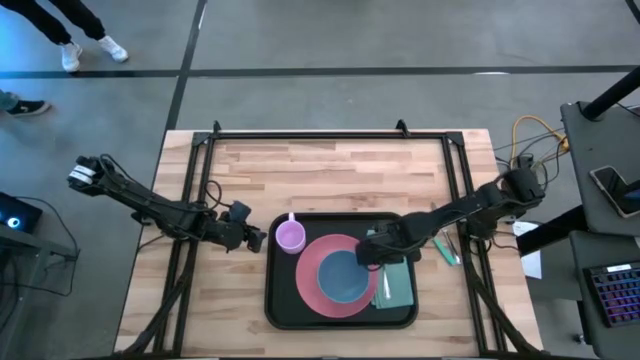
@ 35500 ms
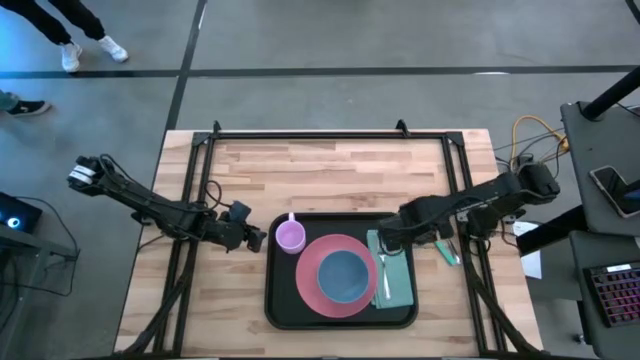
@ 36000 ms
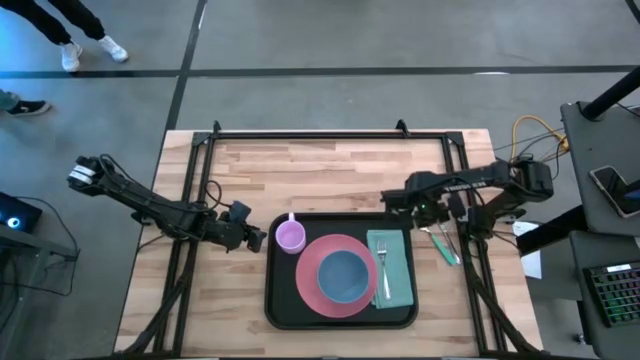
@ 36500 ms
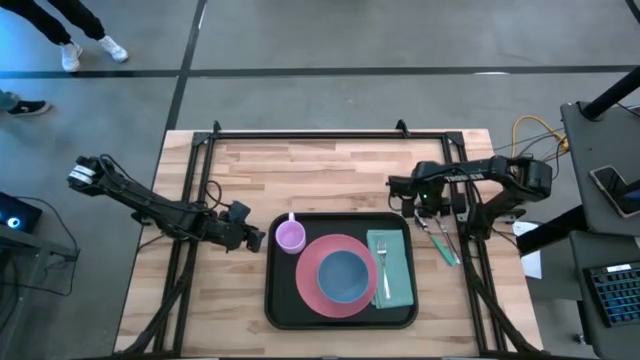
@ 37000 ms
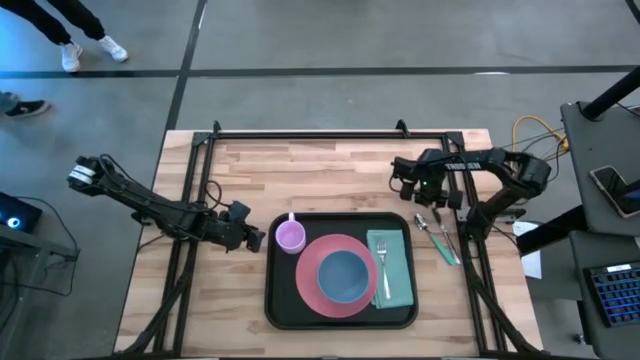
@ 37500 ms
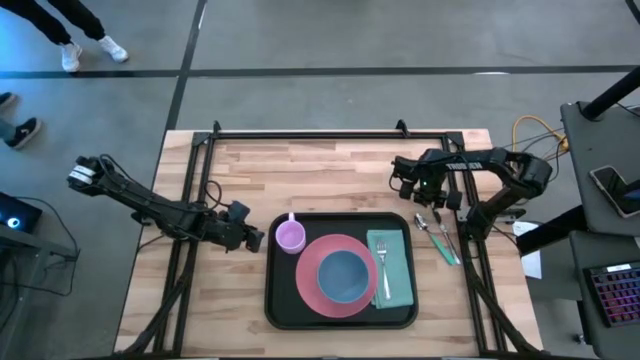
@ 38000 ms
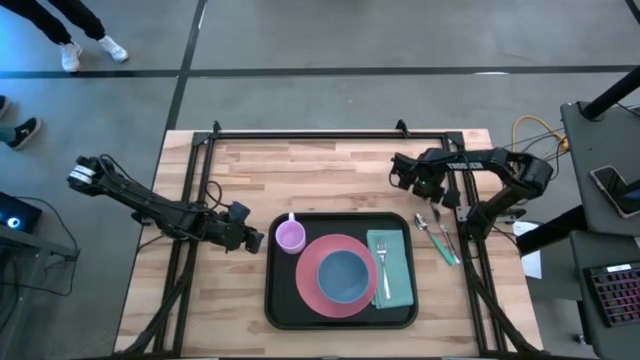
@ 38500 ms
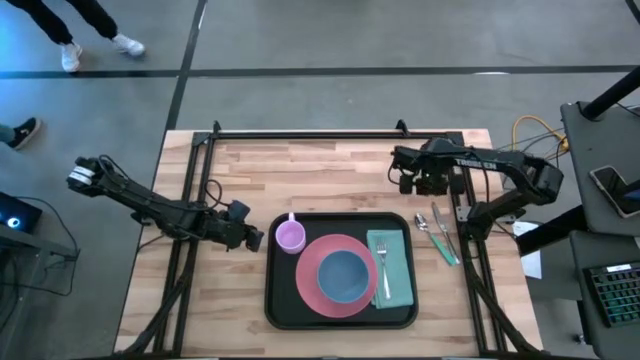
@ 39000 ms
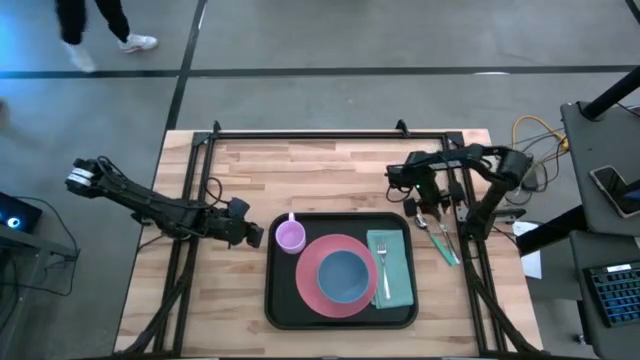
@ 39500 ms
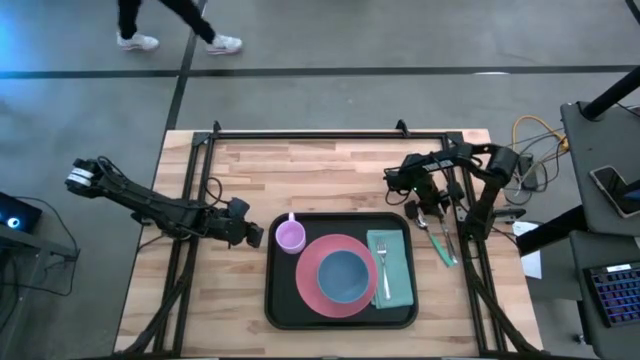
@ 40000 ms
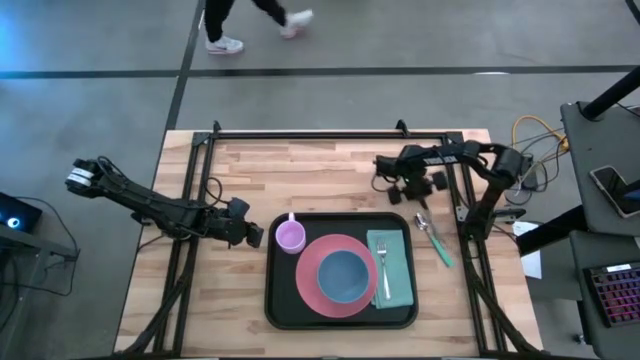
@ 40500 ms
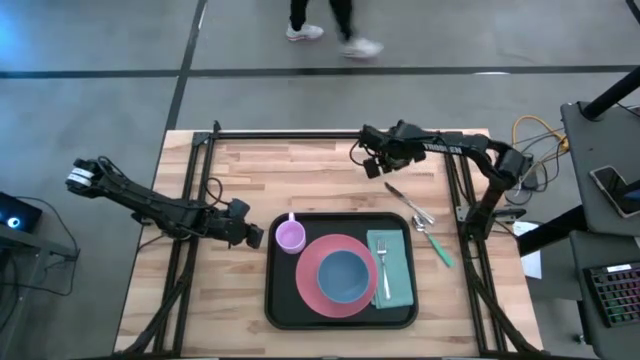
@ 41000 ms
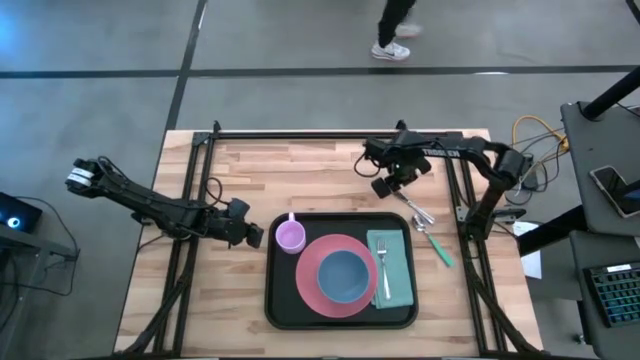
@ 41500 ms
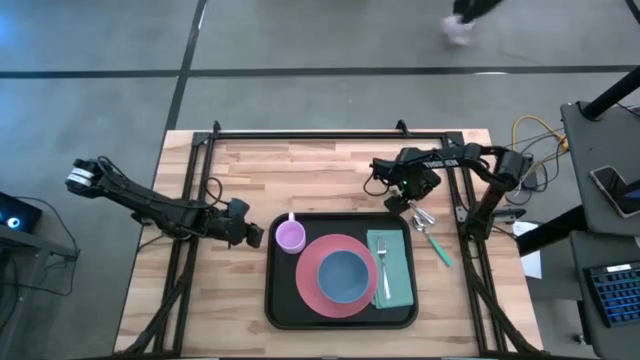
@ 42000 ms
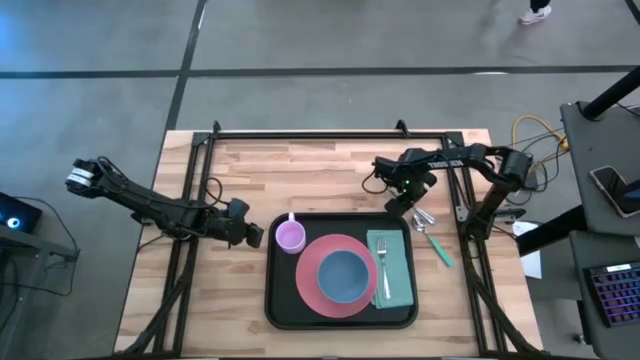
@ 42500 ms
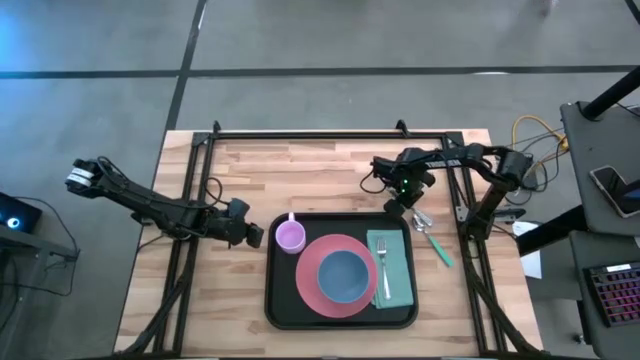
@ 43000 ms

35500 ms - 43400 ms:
Task: Set up tray
Put the silver table knife to the right of the silver fork on the green napkin

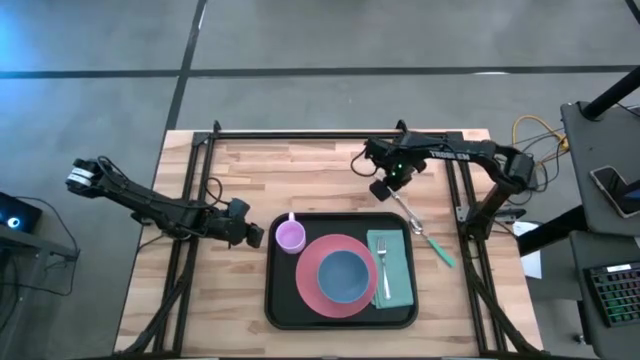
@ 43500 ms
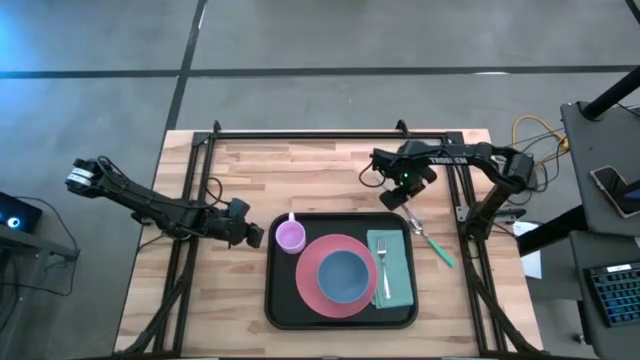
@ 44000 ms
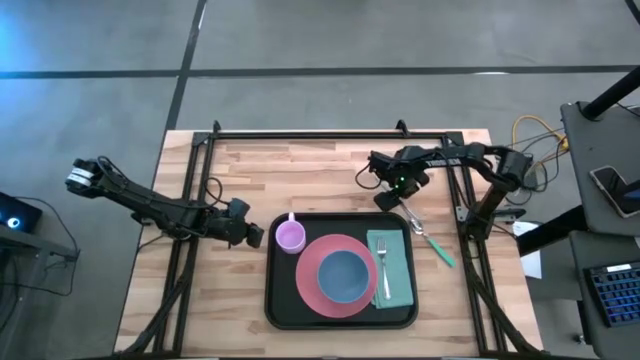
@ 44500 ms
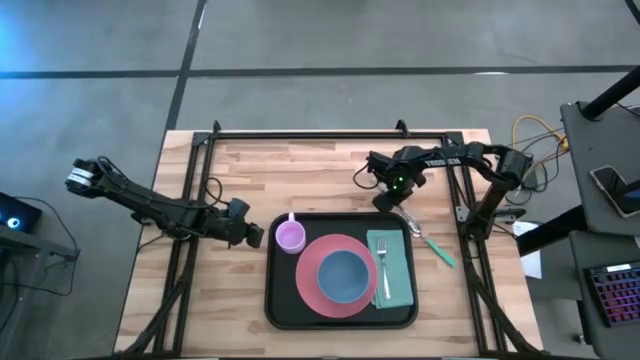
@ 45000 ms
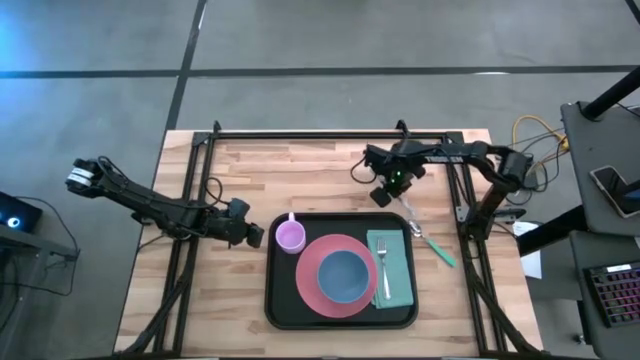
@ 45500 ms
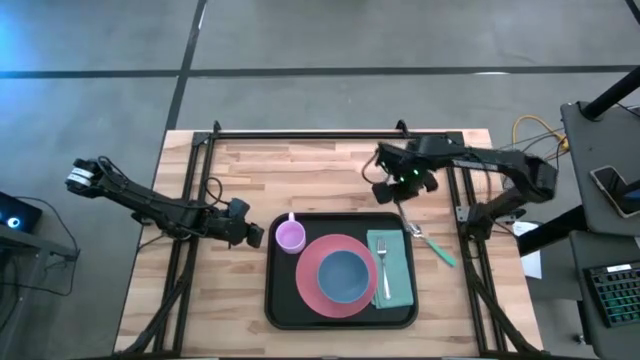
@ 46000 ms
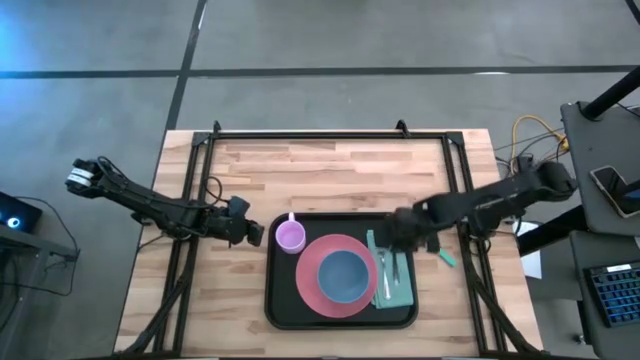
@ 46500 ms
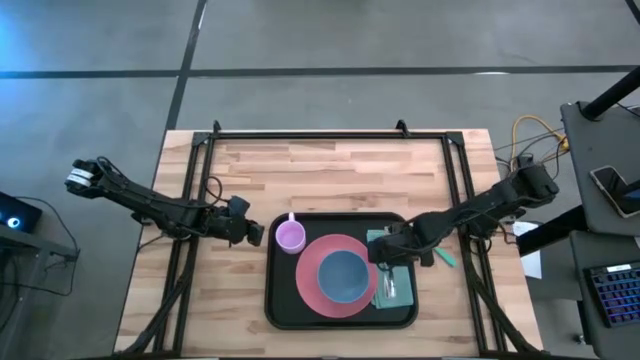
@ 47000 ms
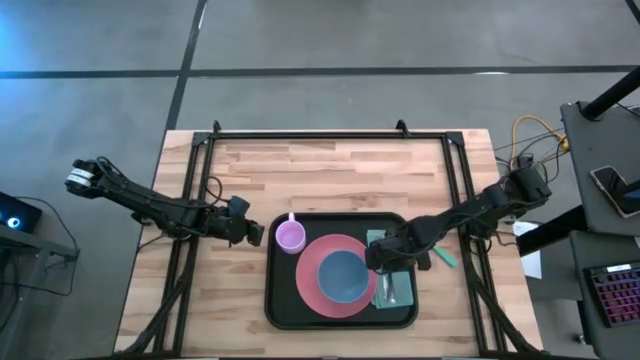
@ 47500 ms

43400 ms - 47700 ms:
Put the silver table knife next to the silver fork on the green napkin

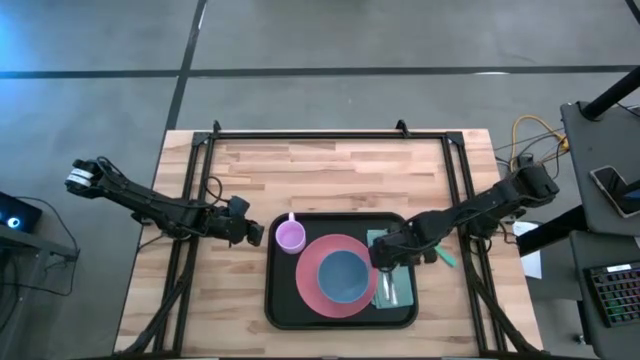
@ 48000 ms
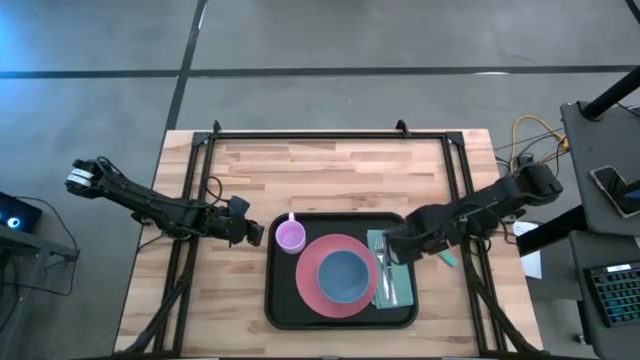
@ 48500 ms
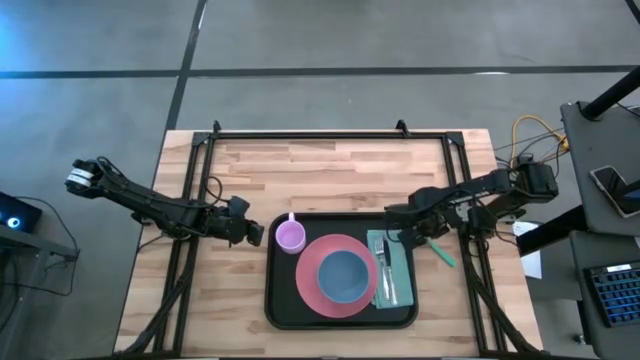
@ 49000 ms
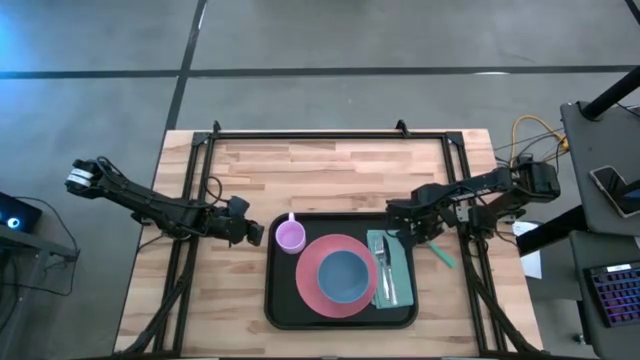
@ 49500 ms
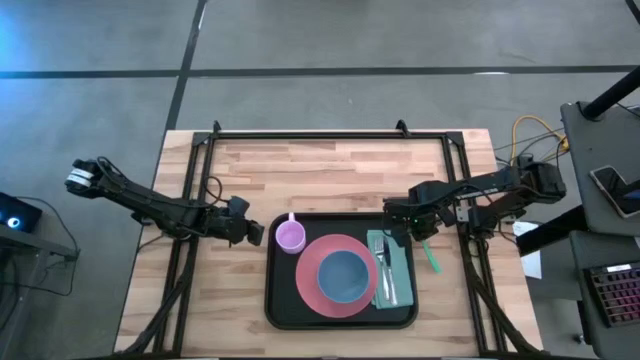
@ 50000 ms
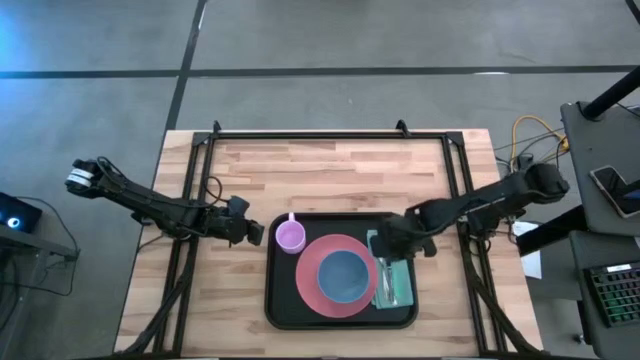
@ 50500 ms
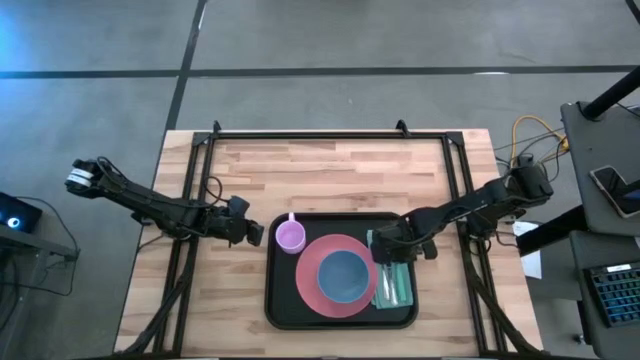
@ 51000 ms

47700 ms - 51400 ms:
Put the green table spoon to the right of the silver table knife on the green napkin

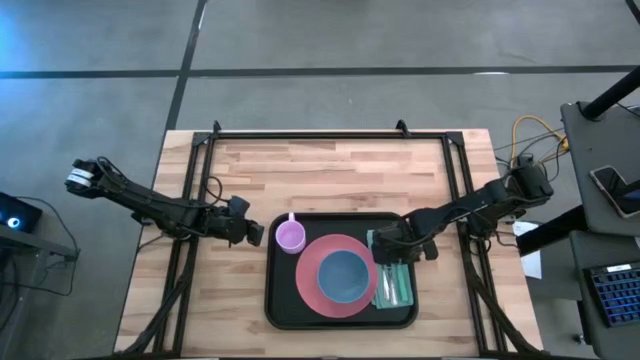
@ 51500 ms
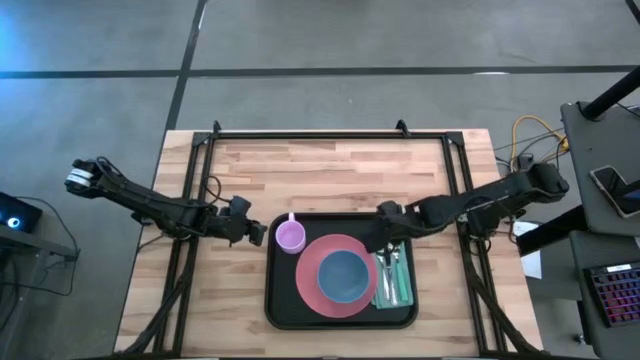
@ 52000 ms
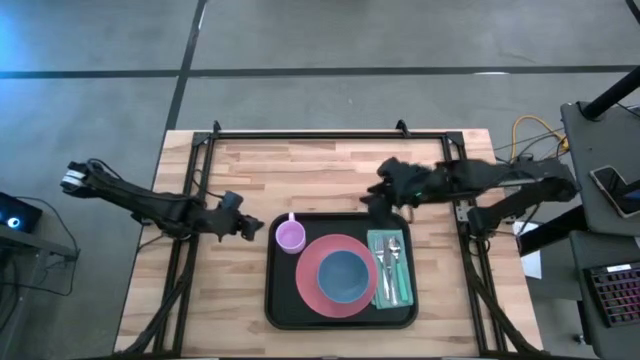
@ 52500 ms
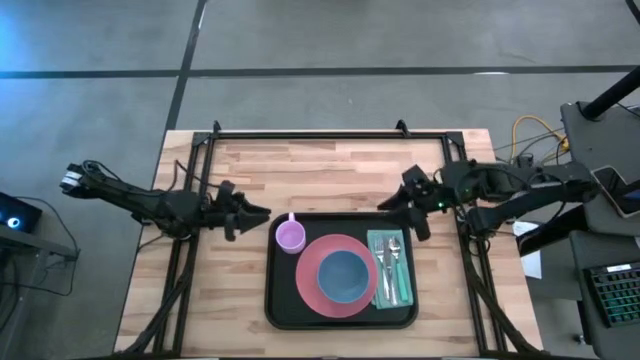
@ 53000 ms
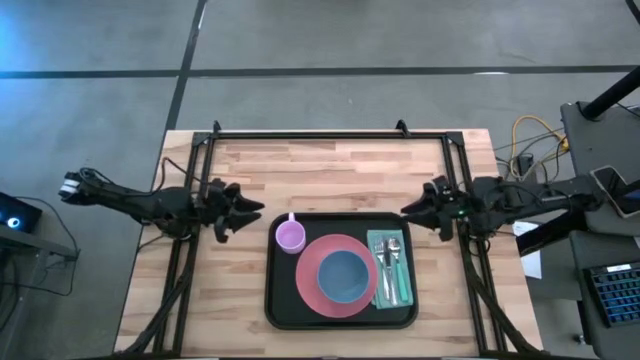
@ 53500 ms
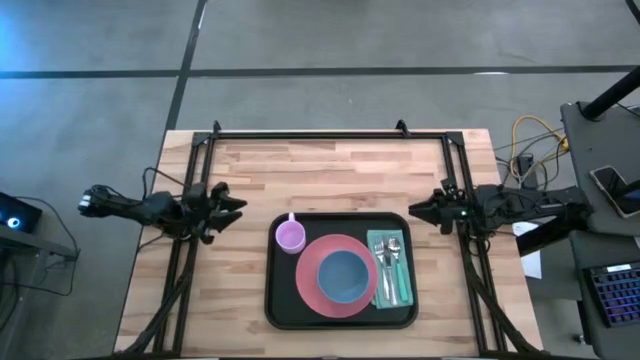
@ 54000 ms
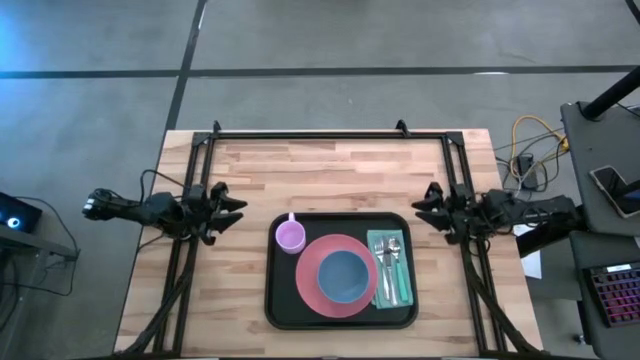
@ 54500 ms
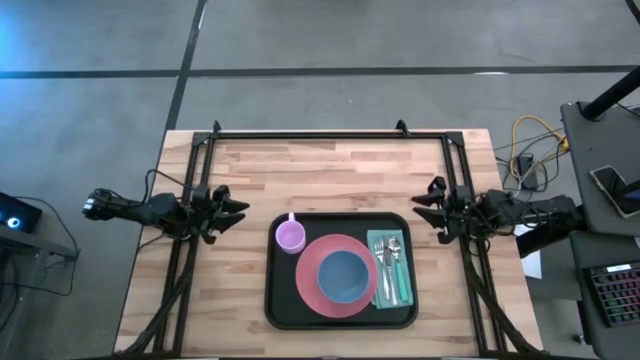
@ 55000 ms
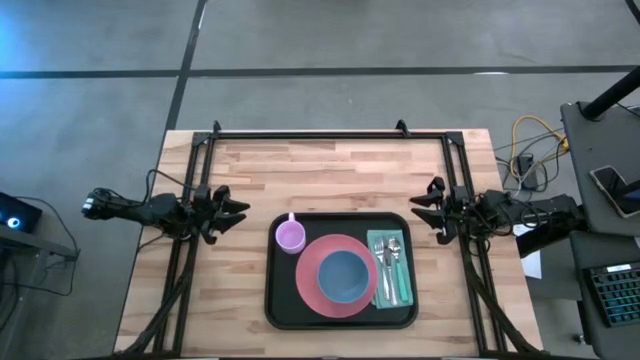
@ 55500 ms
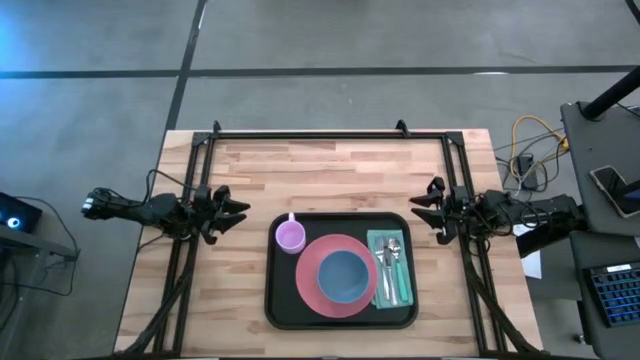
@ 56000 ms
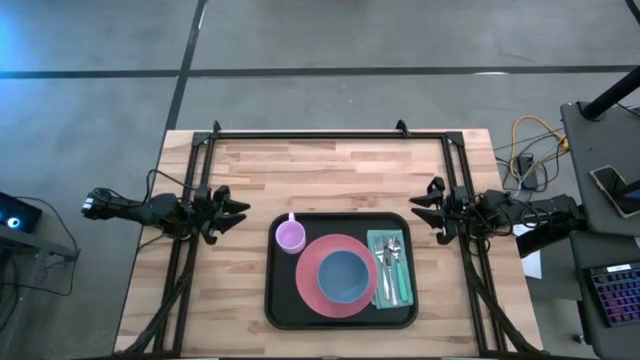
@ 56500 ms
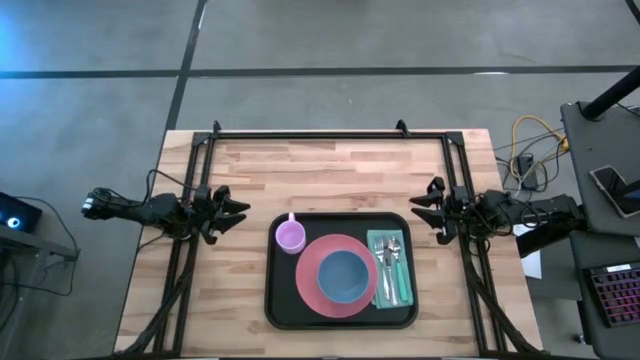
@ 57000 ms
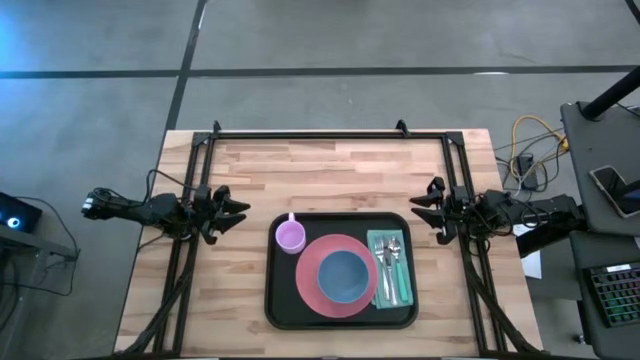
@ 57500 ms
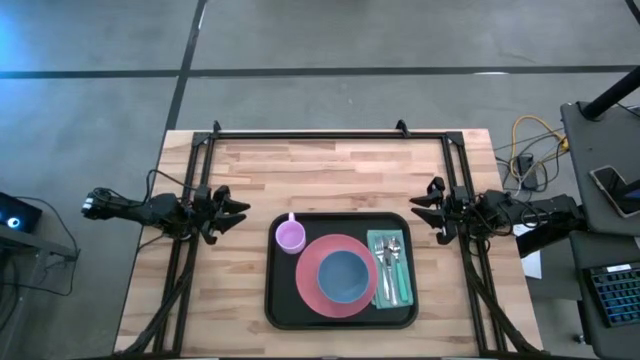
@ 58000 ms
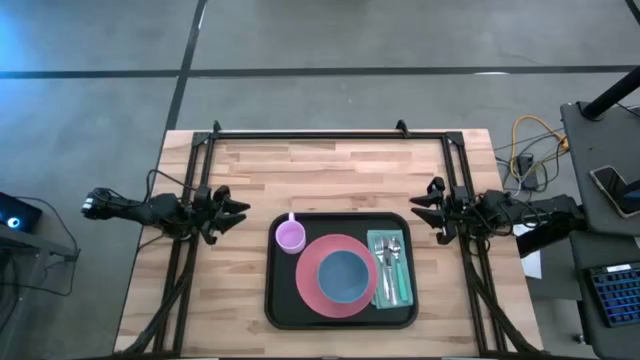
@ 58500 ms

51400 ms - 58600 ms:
Return to Home Position
